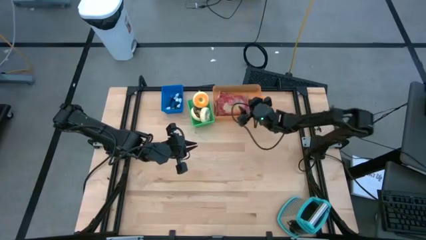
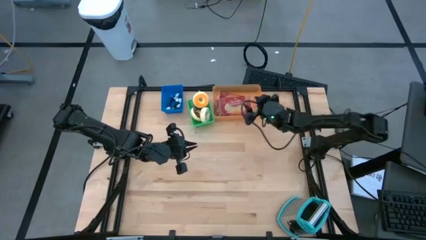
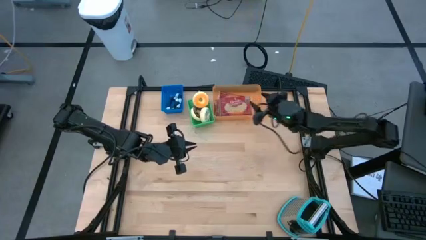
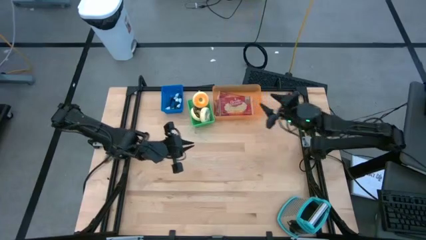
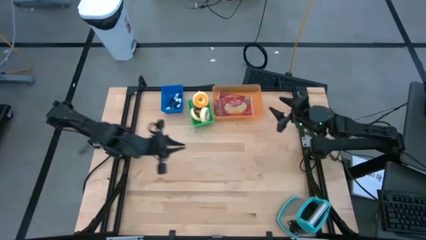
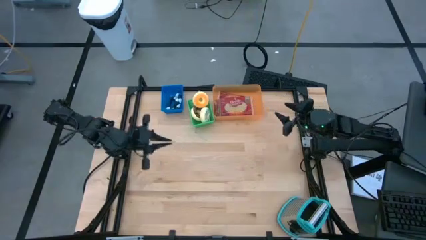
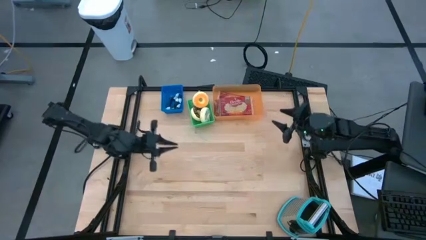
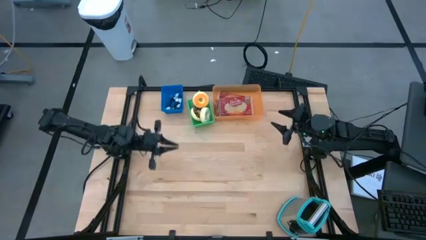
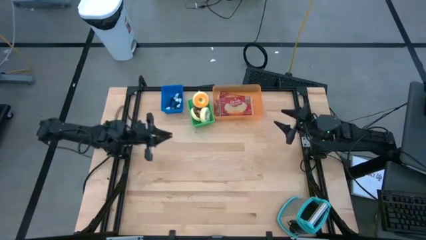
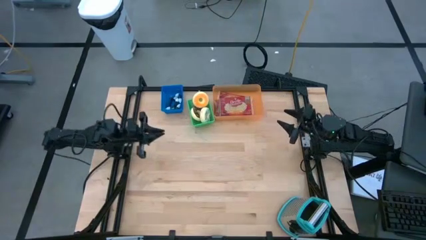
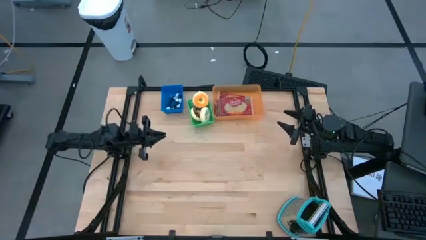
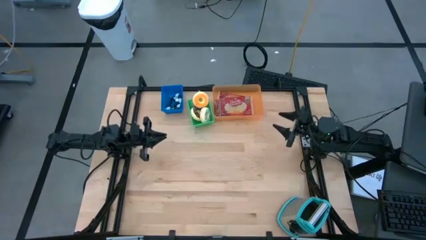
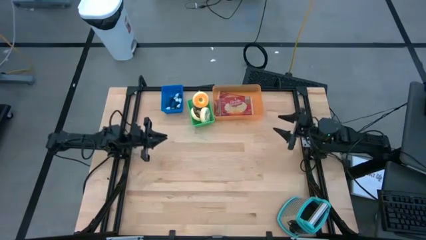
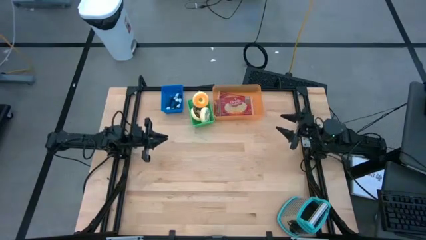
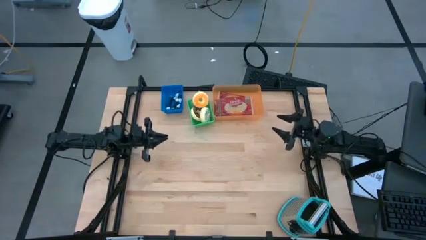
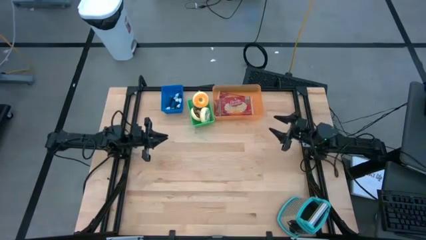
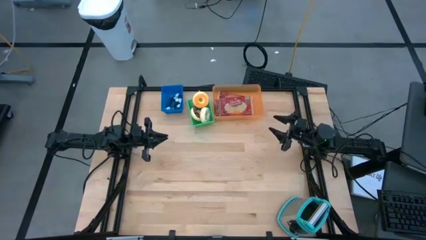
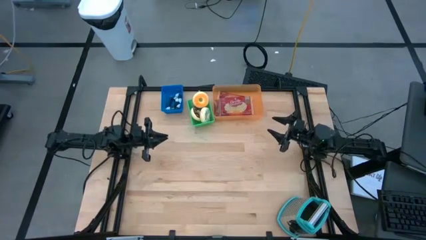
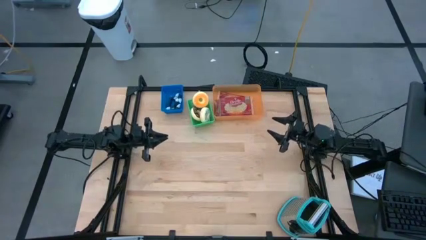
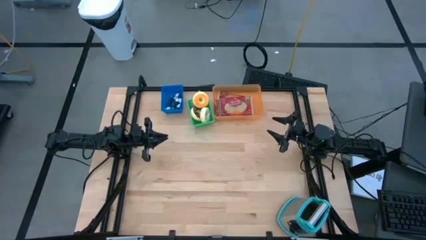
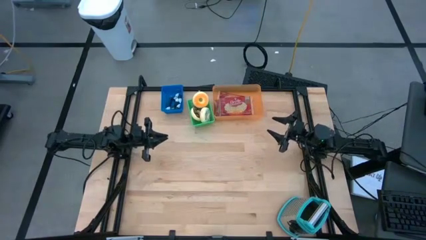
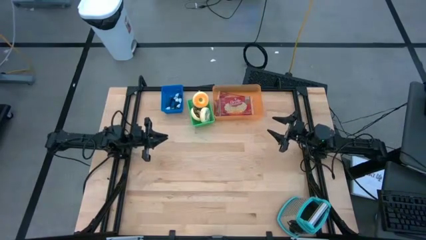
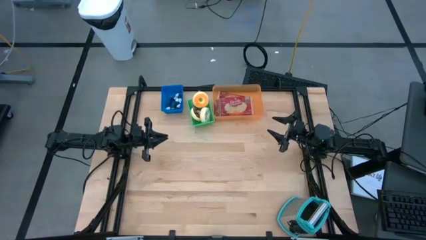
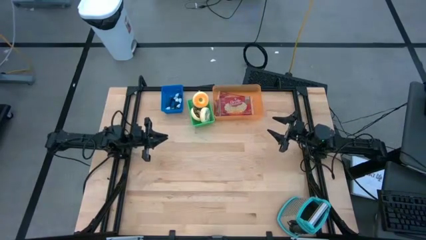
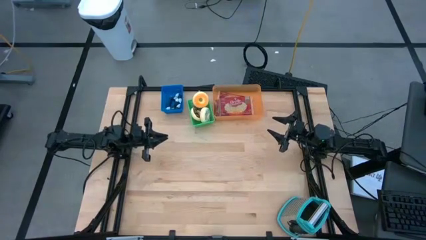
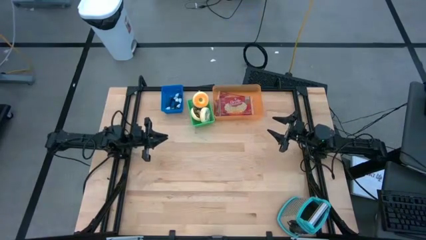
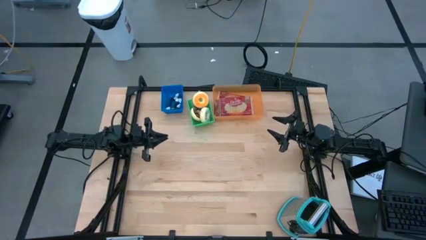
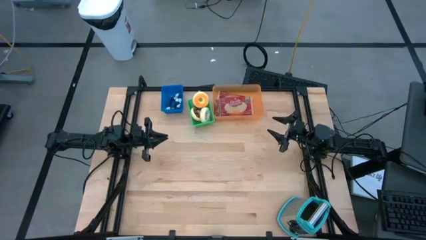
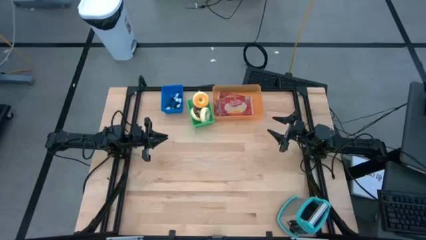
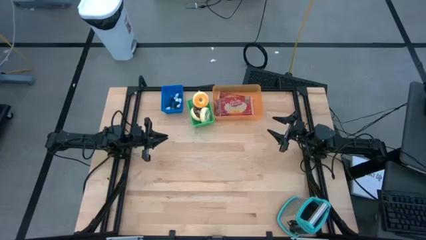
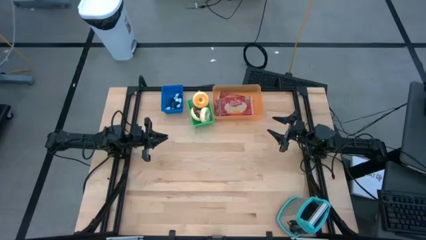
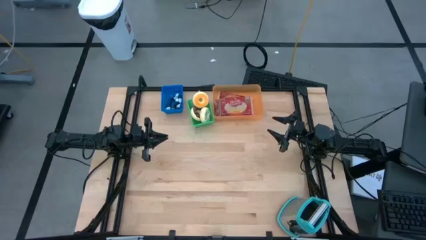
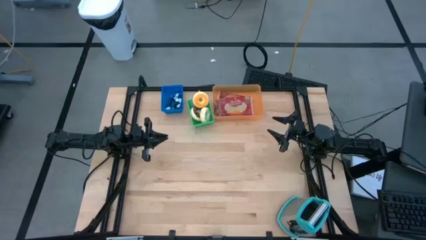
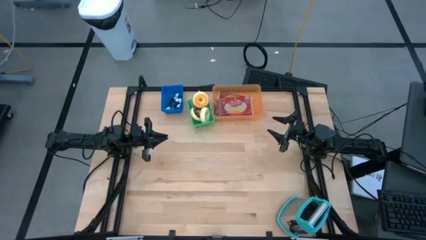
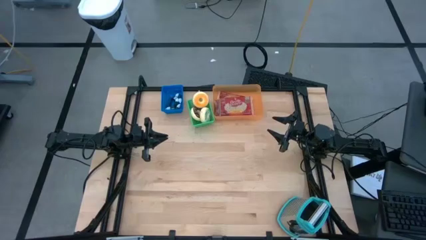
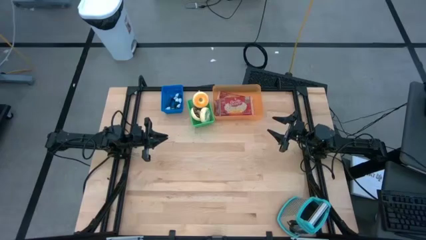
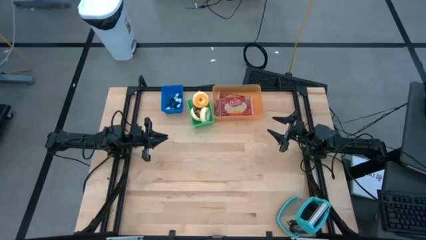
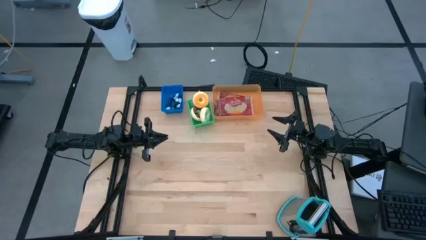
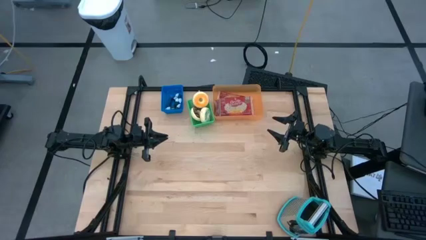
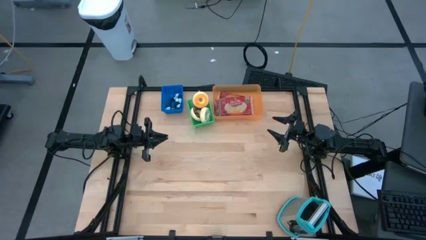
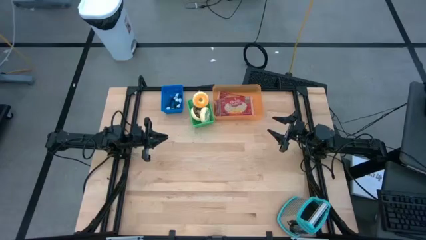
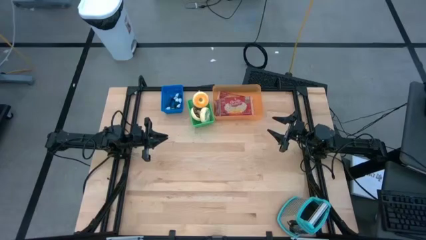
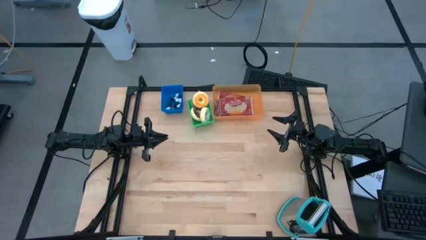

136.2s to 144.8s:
Return to Home Position
